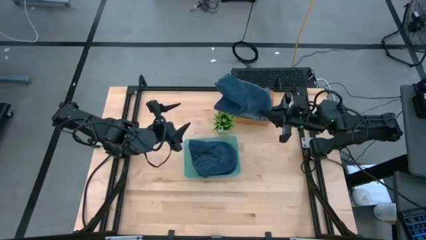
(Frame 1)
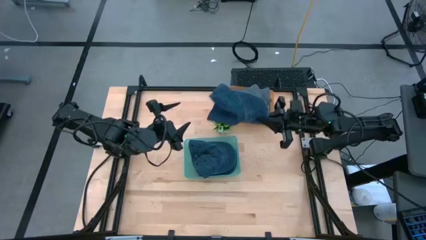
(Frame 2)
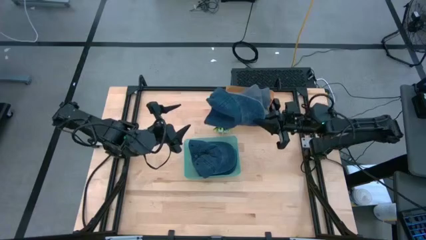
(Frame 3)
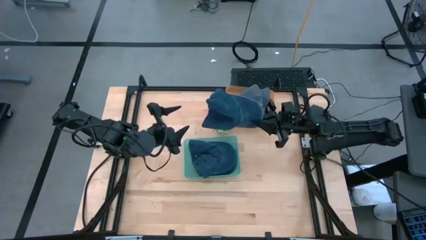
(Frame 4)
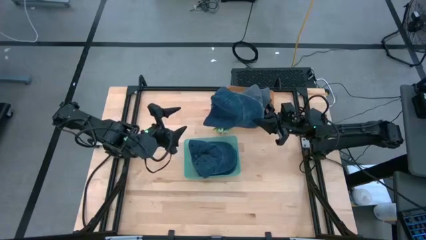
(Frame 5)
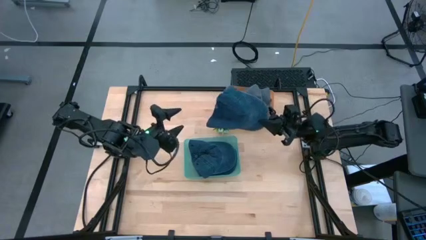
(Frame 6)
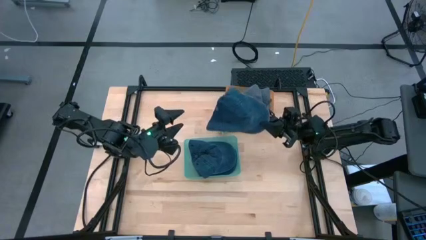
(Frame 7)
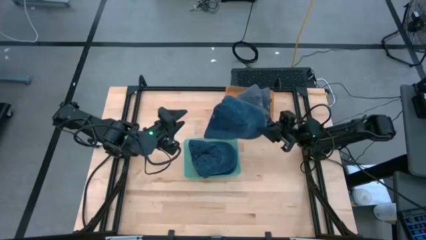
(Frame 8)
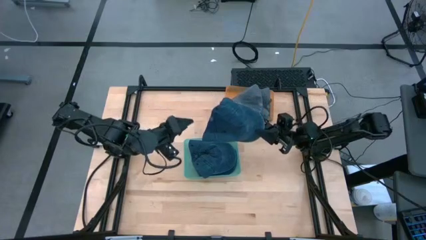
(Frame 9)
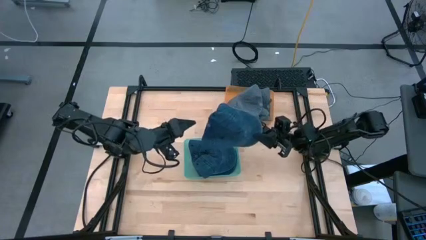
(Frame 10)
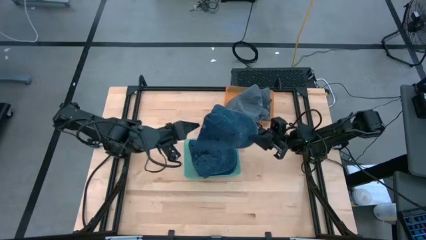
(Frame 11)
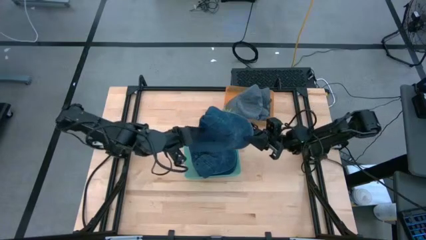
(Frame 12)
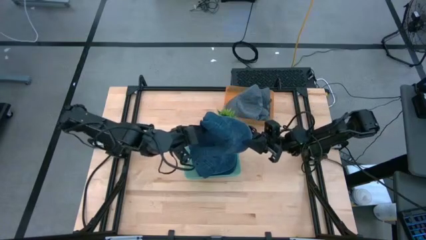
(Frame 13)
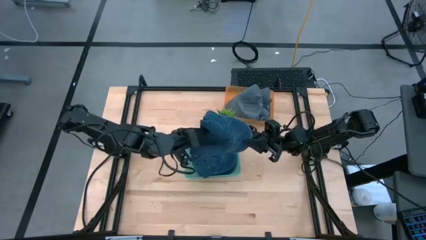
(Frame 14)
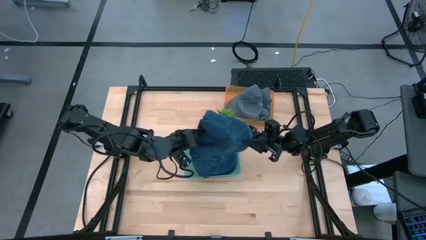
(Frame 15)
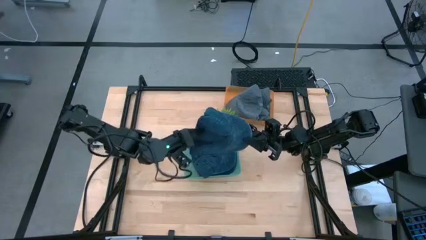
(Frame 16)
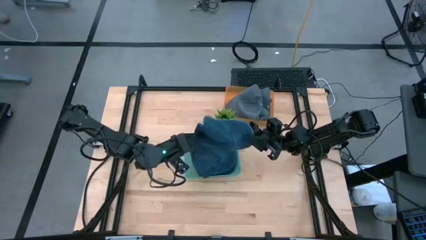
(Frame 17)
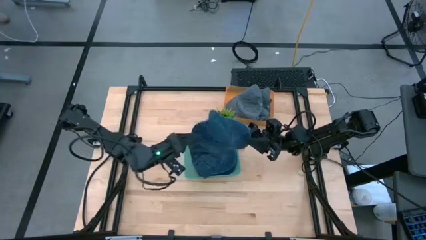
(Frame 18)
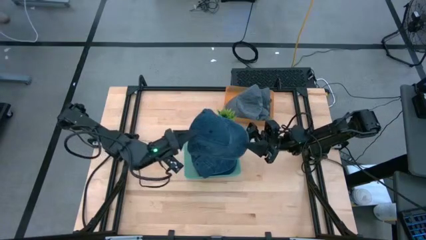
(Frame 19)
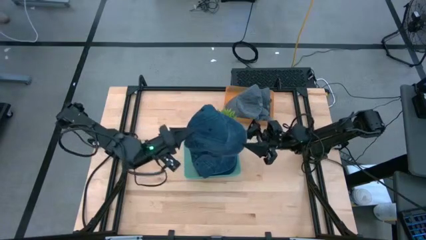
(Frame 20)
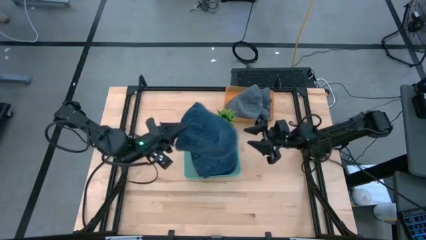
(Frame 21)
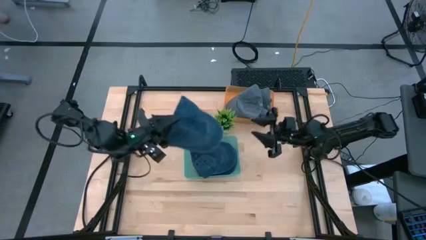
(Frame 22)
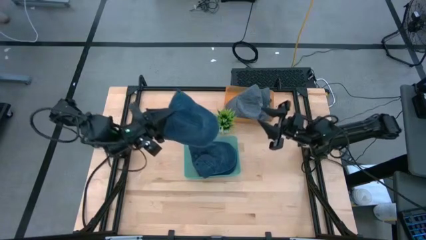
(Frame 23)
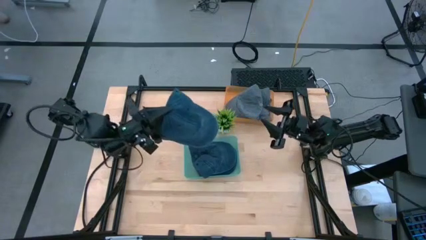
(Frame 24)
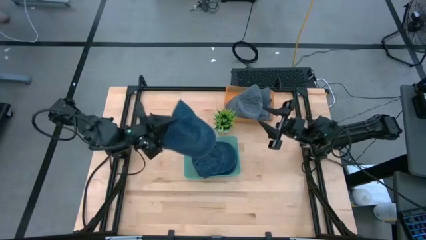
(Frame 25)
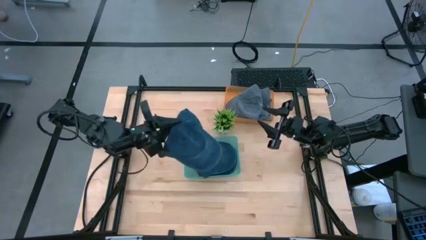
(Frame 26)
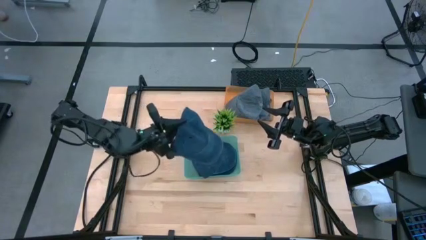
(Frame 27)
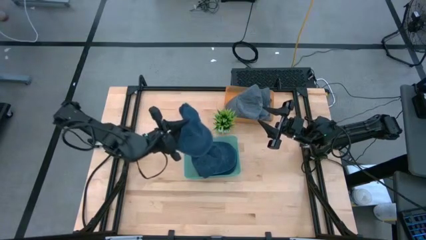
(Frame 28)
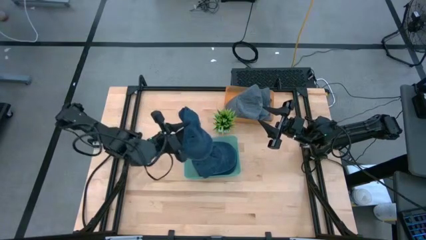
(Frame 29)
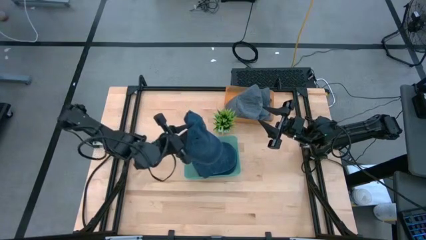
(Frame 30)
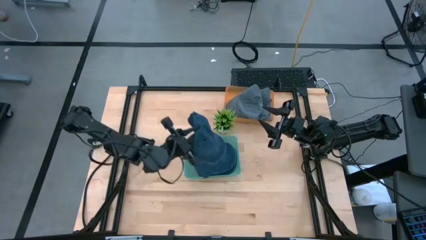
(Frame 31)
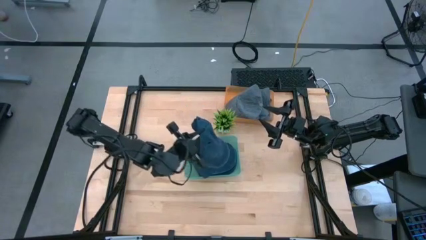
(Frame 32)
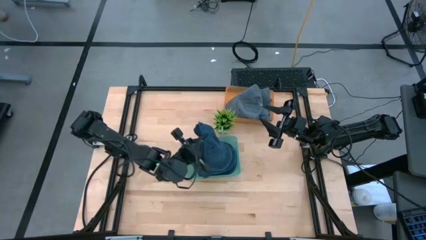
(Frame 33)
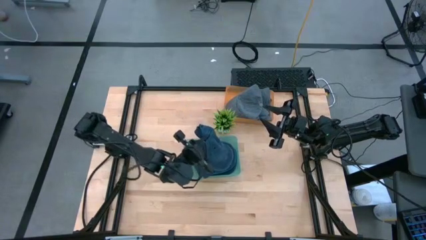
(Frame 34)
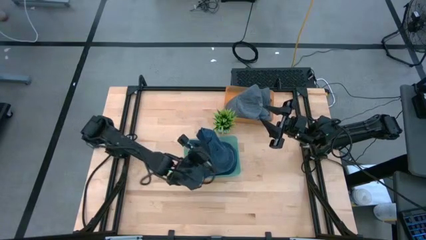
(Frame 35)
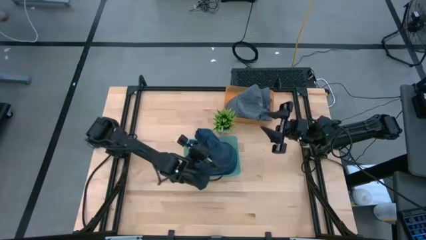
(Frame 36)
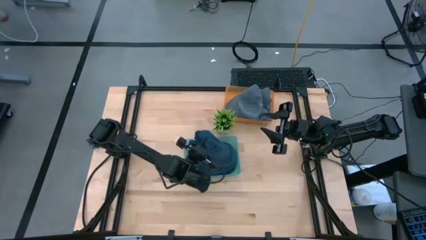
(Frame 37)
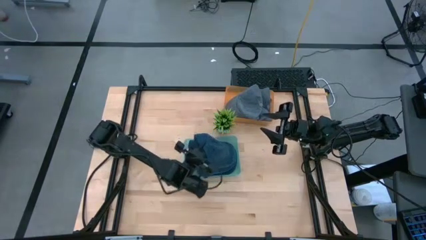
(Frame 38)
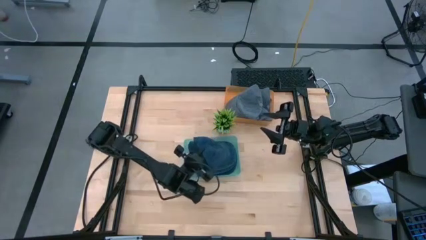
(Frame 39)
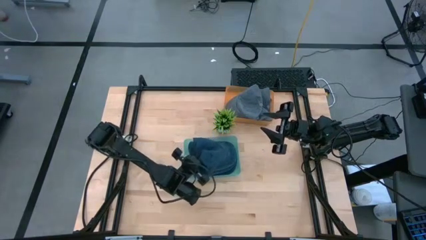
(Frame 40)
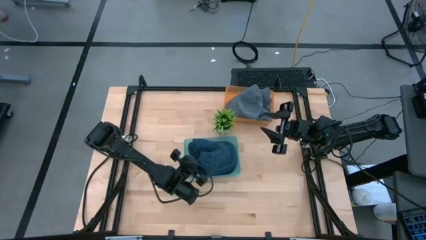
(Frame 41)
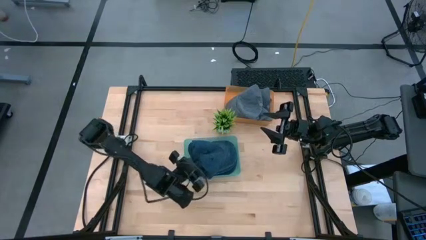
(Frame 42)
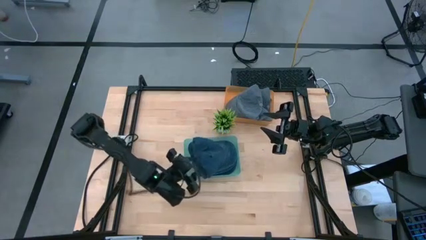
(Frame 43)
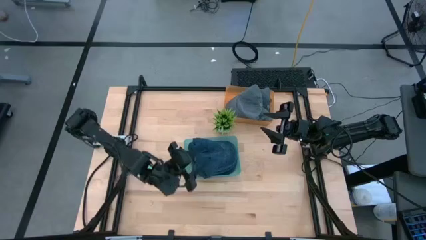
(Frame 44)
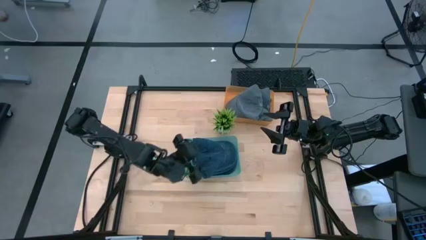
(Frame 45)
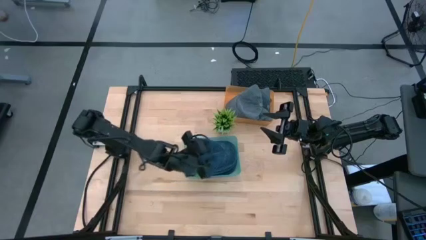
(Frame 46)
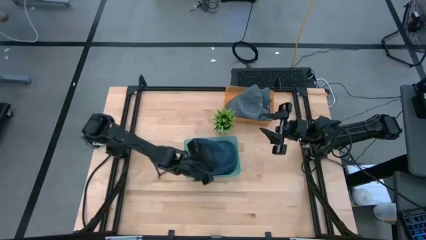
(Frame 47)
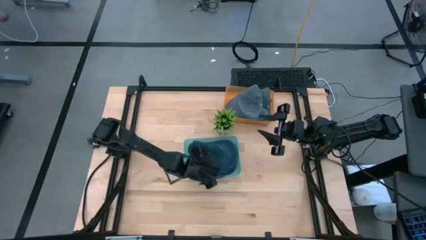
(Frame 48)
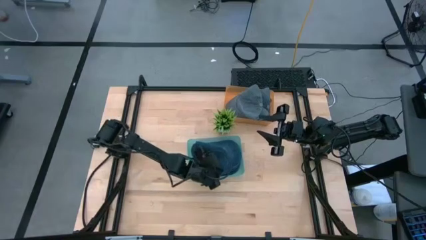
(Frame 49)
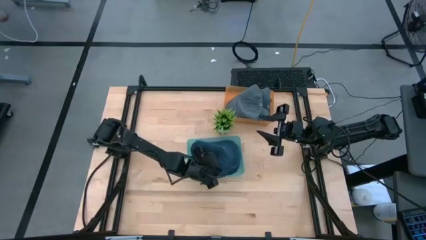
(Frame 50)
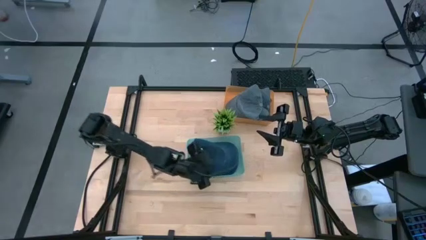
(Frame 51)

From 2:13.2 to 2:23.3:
Task: Pick & Place hat
Put the blue cap into the green bin

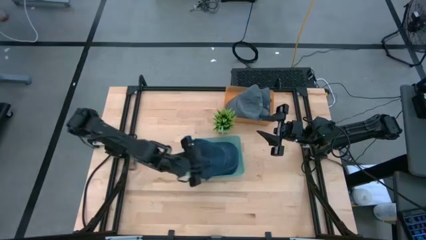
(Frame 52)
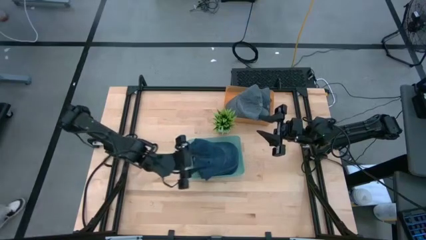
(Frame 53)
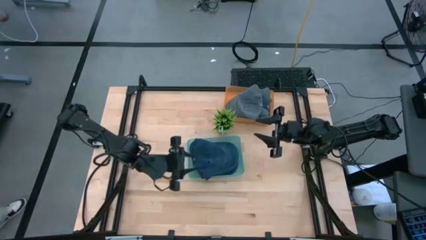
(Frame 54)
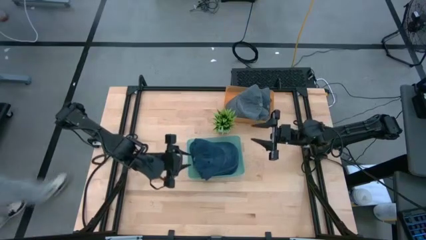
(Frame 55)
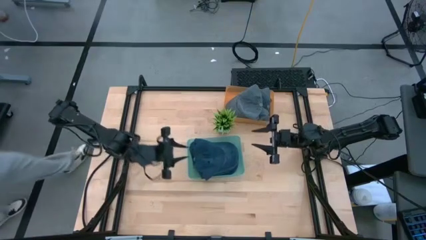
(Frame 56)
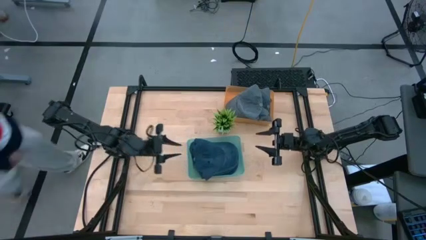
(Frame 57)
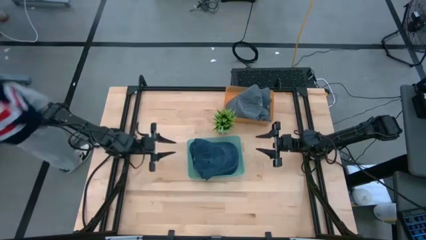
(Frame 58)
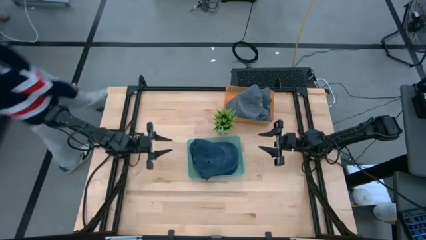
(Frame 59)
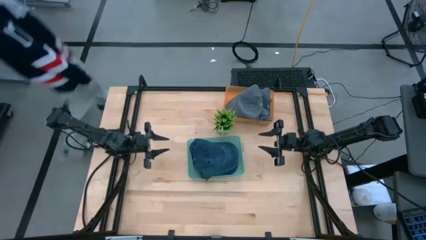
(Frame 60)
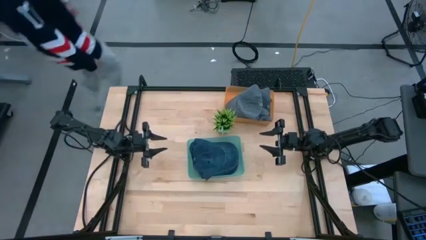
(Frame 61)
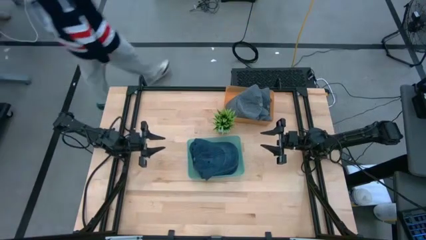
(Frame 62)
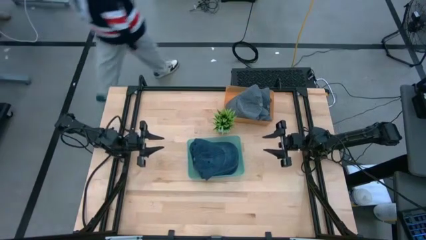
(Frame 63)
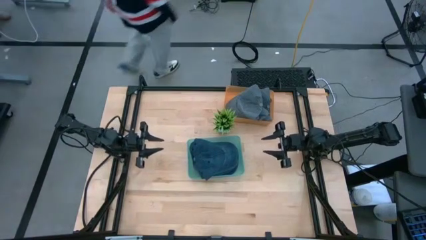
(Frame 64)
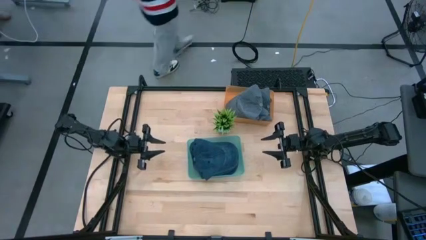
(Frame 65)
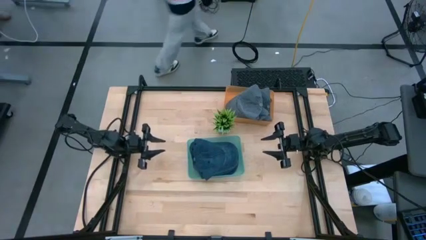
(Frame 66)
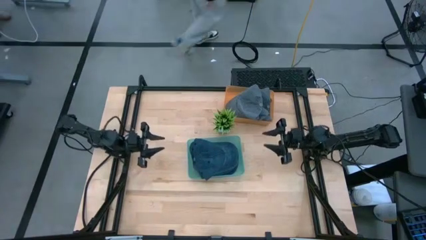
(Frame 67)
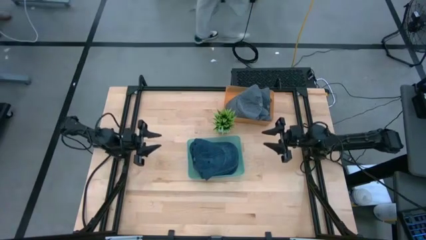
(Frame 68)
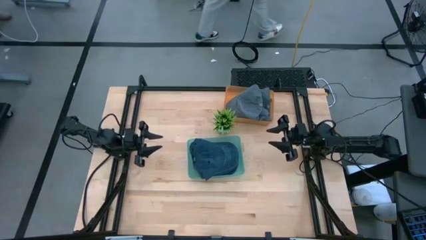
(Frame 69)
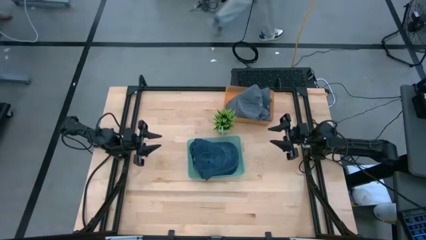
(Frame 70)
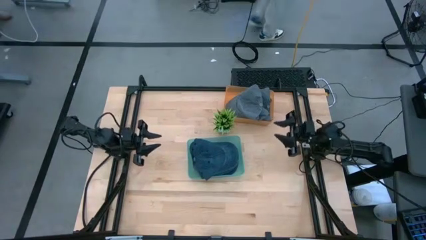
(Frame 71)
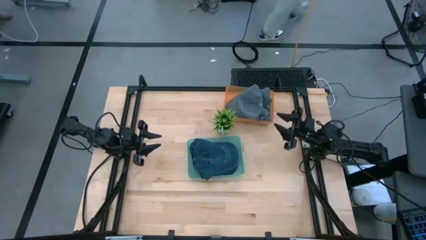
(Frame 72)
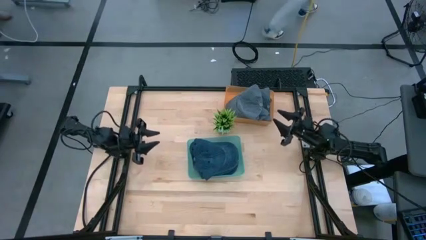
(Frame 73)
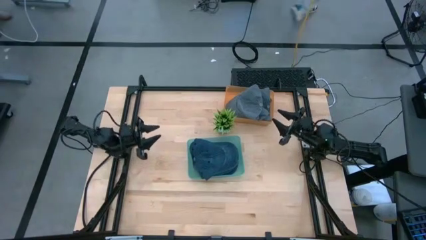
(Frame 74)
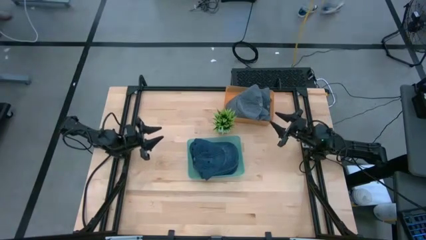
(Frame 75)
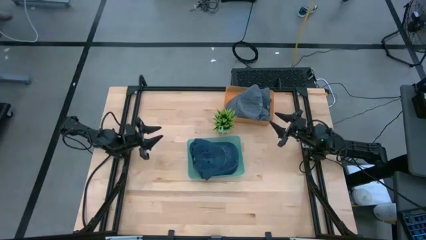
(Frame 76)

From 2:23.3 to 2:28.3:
Return to Home Position

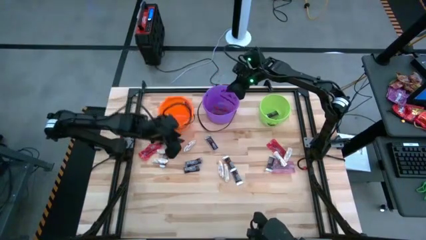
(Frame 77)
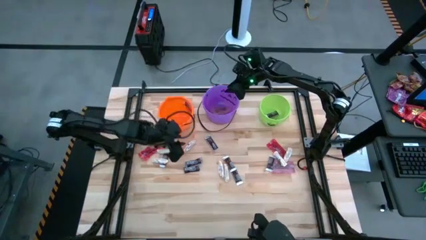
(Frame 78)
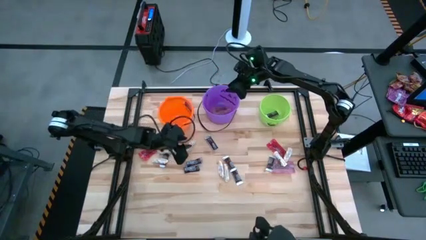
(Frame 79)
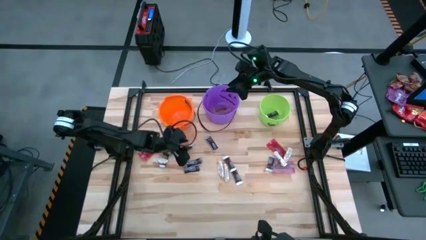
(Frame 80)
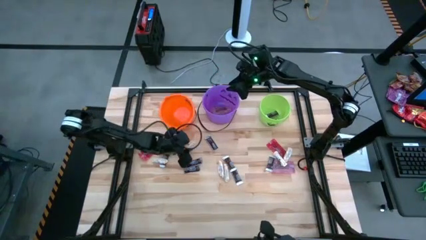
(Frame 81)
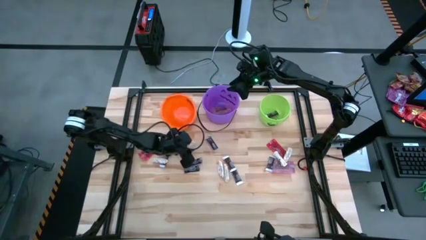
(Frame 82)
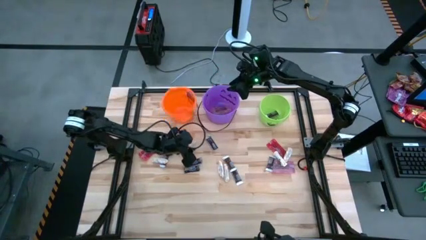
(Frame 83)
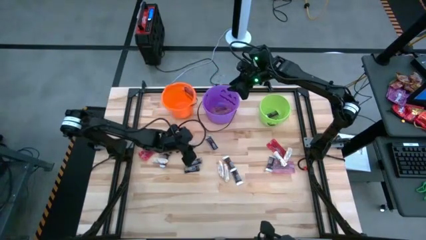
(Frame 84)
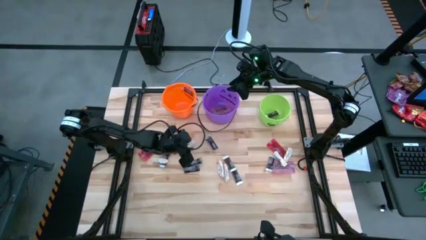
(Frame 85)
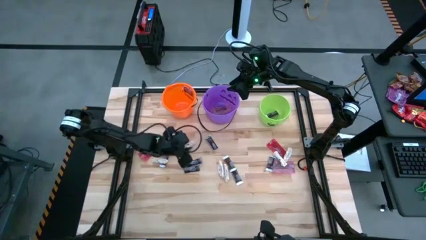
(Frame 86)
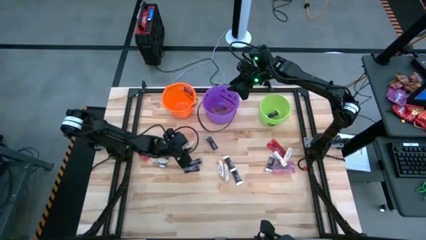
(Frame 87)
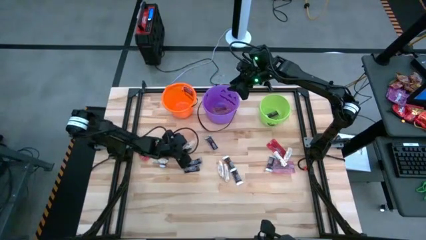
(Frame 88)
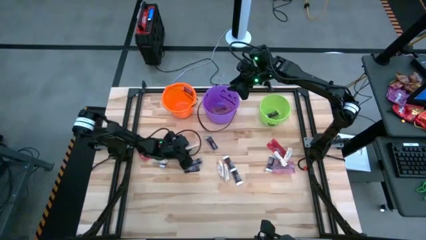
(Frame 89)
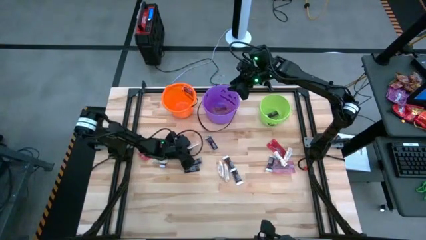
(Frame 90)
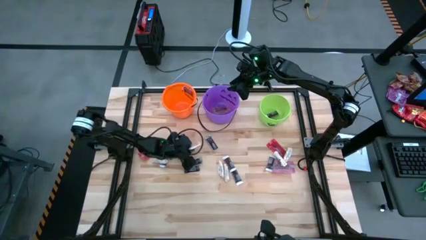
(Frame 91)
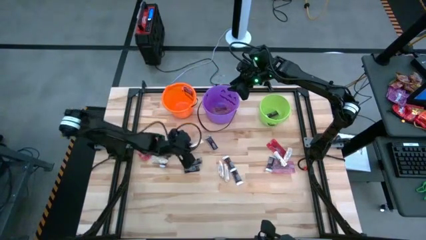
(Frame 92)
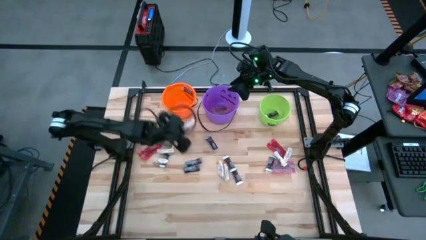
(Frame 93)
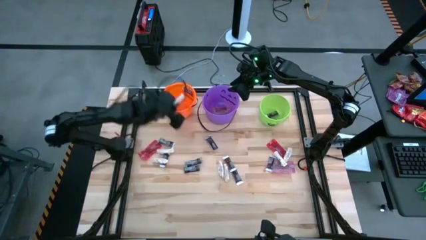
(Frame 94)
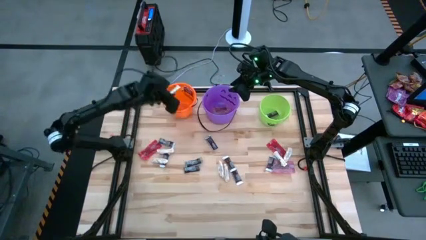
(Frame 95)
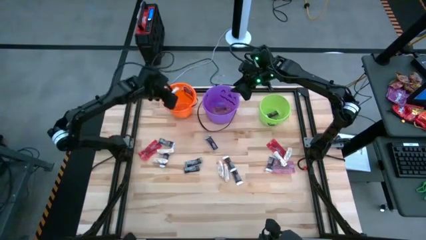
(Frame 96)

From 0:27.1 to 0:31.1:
Task: Sort candy by brand, put in halloween buckets
Put the white chocolate bar into the orange bucket
